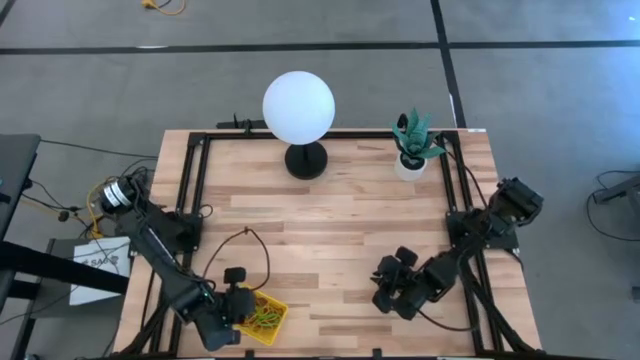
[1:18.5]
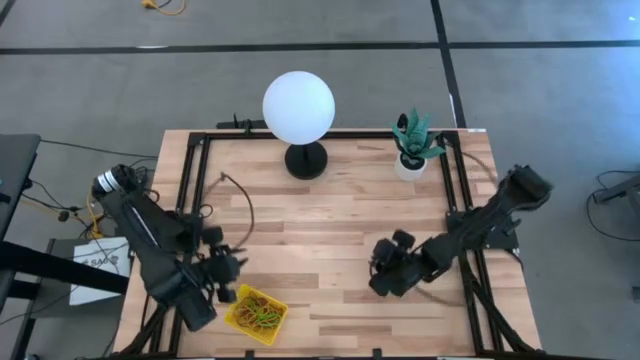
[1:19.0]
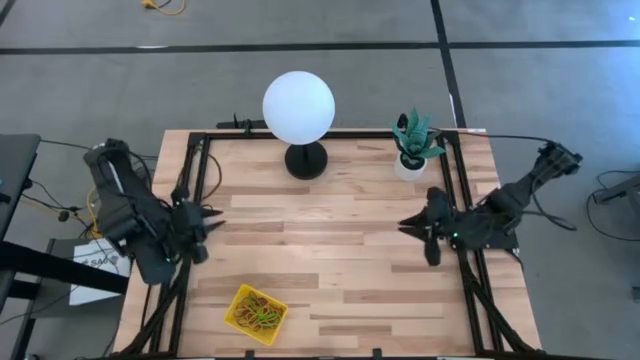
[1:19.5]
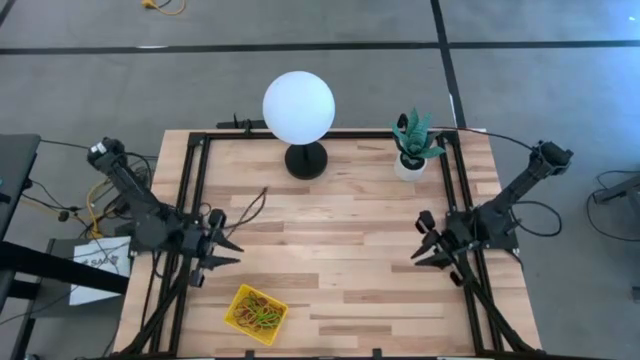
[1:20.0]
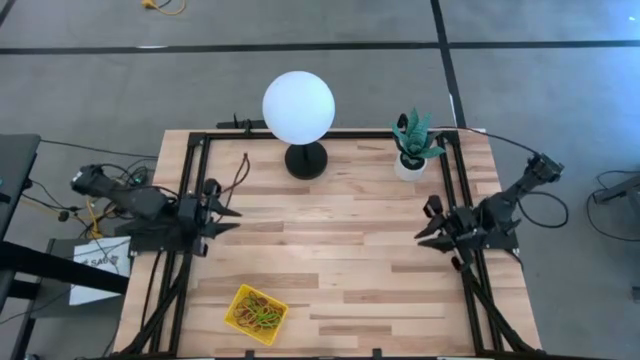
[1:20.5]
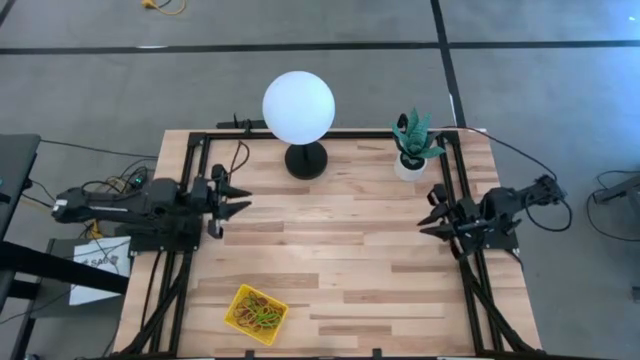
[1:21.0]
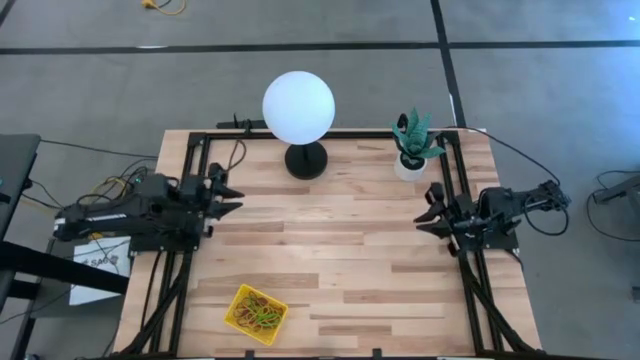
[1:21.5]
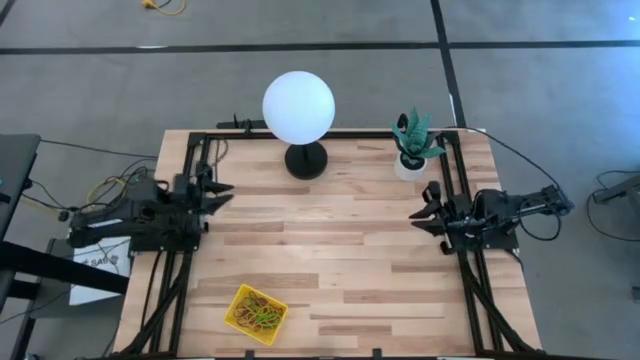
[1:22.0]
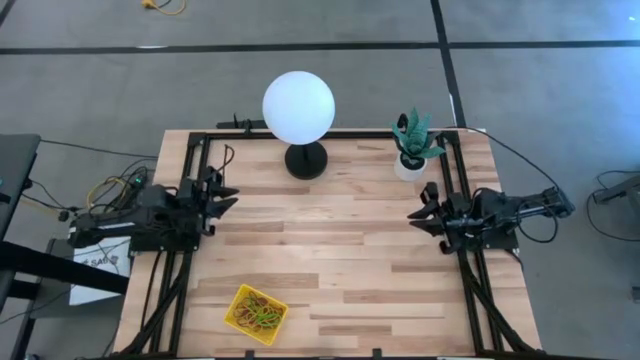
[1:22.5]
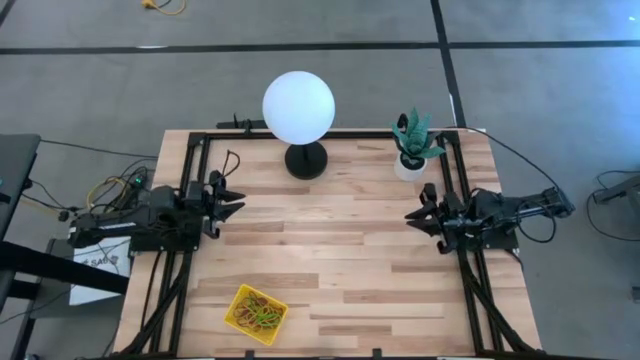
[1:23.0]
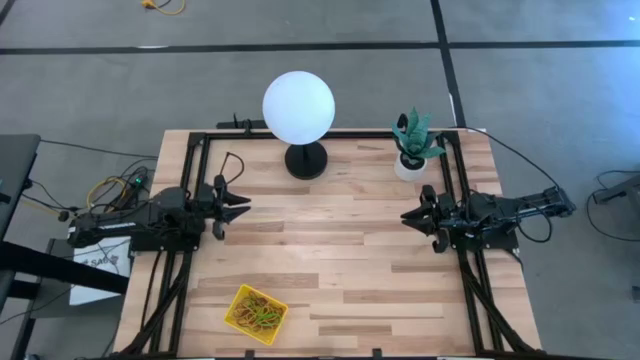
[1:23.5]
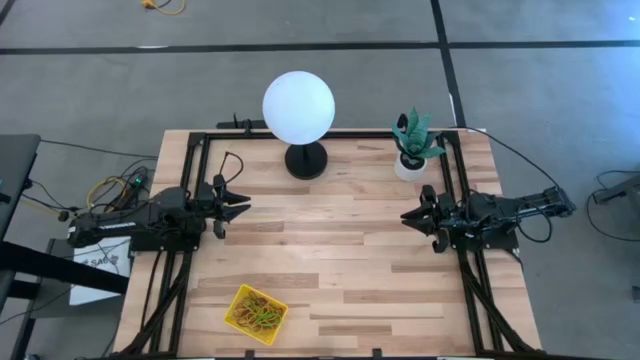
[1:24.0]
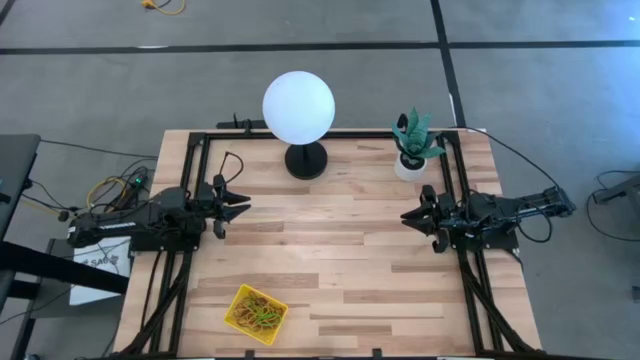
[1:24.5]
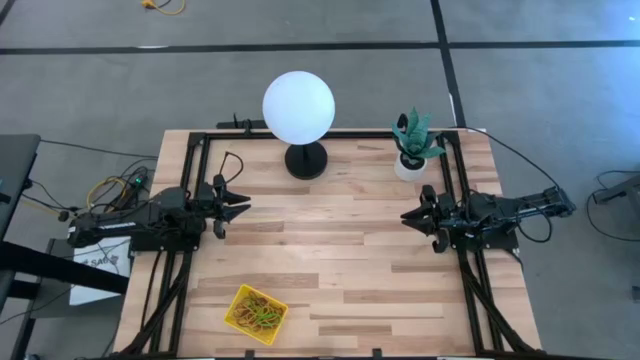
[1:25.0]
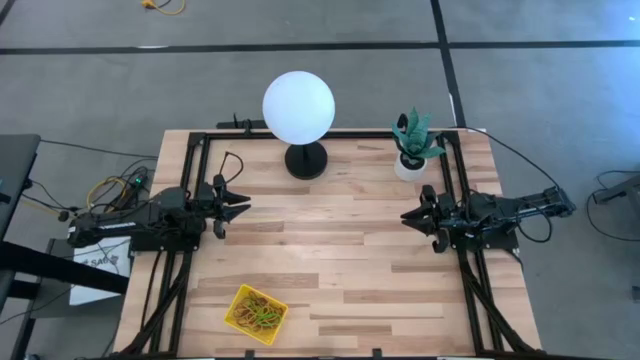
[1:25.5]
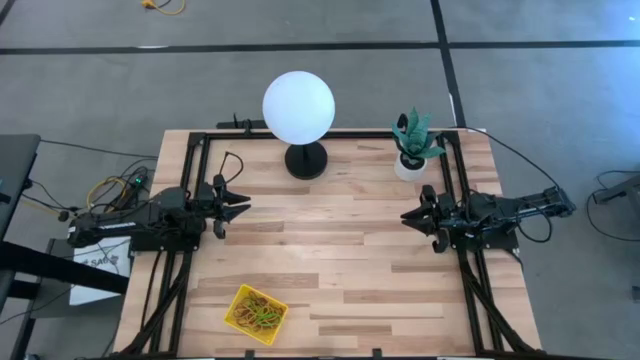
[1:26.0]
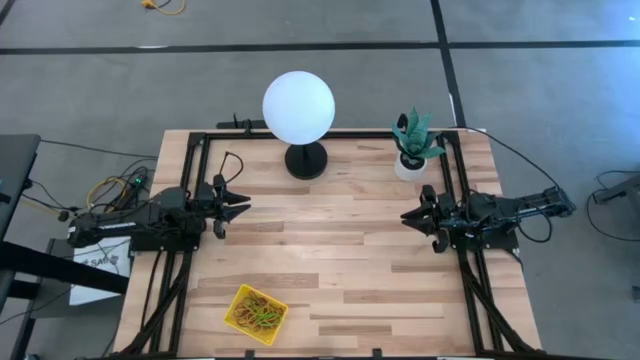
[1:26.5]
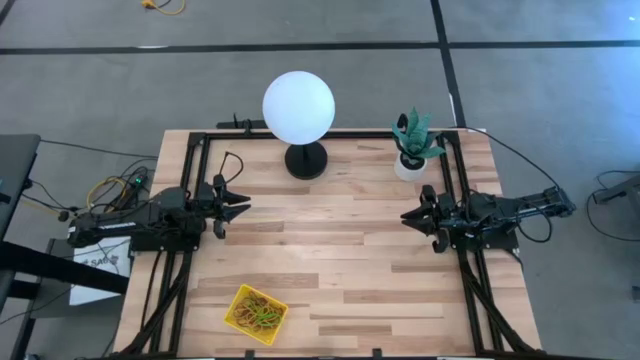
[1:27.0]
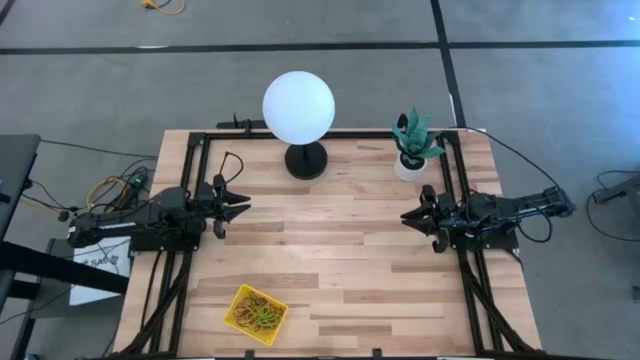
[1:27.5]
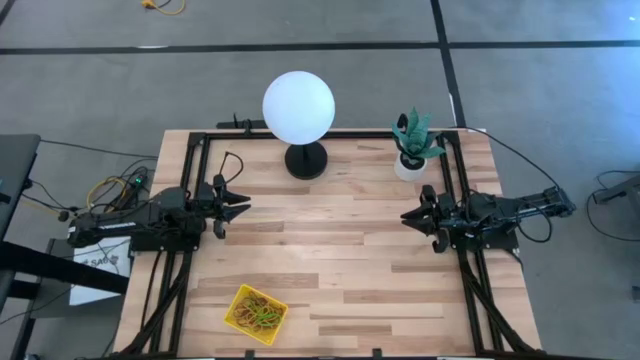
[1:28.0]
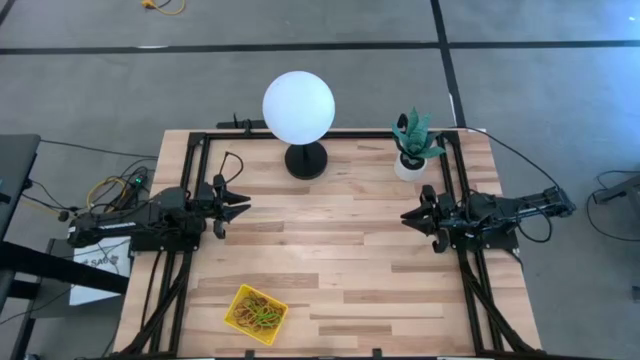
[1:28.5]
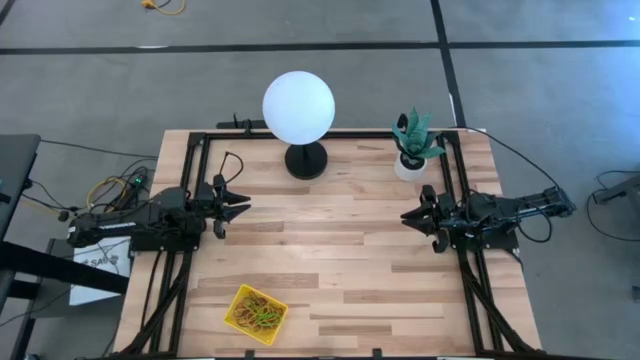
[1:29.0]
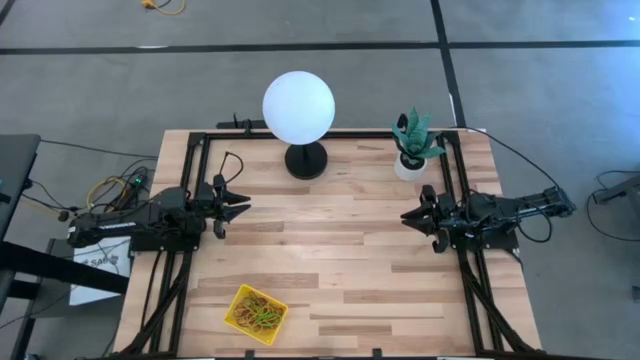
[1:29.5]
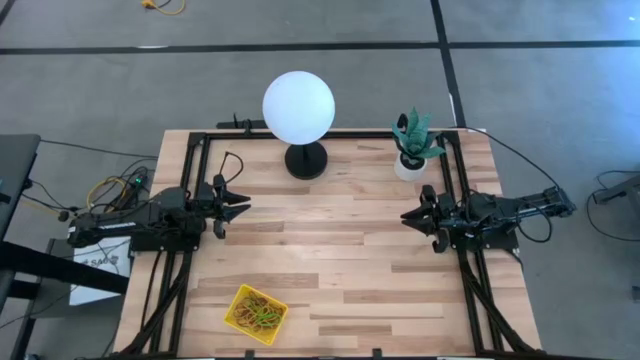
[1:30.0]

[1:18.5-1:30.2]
Task: Pick and place items into bin
Return to Home Position

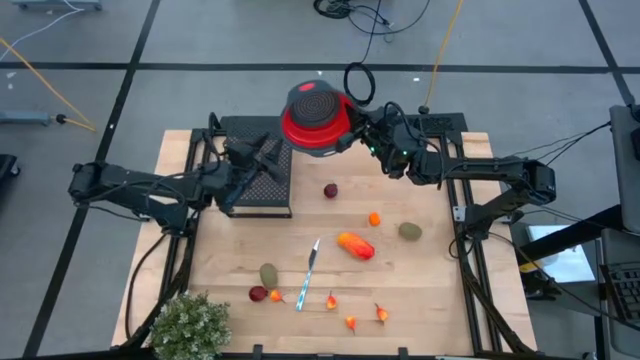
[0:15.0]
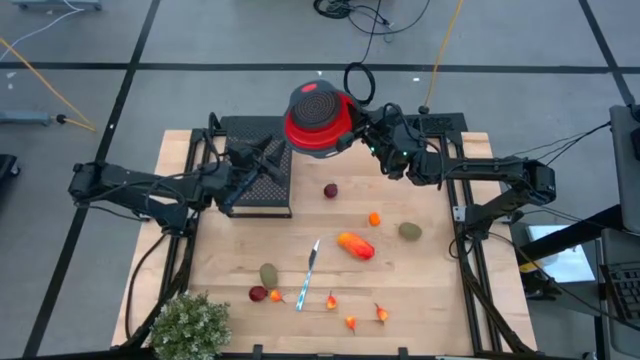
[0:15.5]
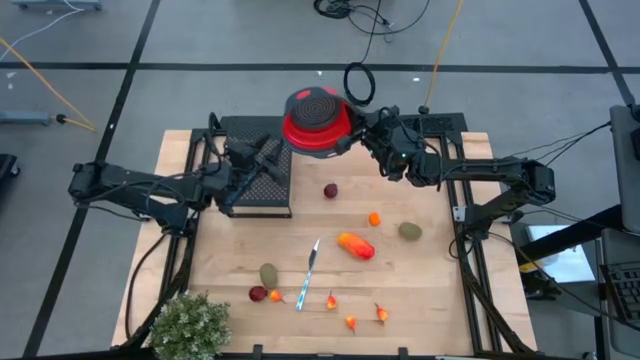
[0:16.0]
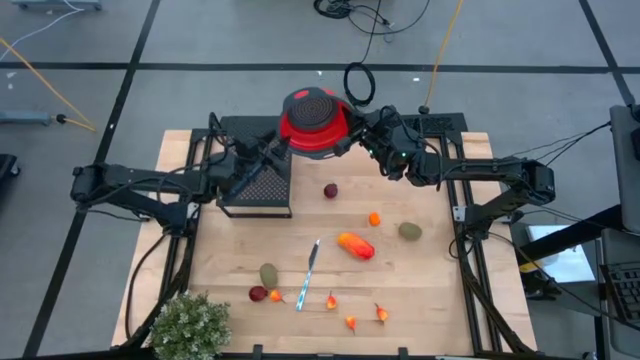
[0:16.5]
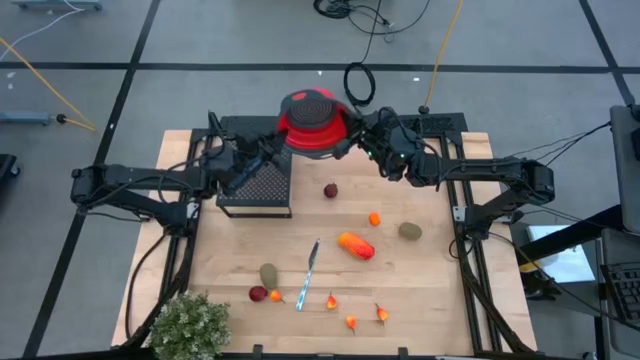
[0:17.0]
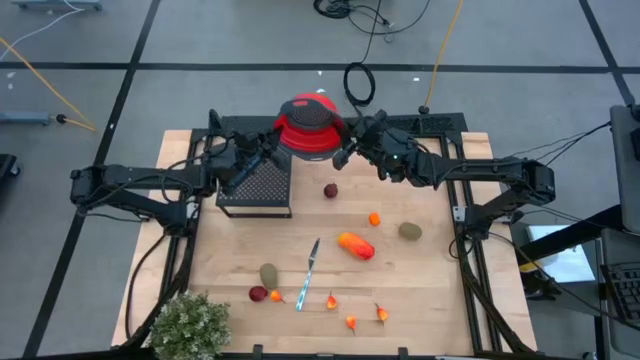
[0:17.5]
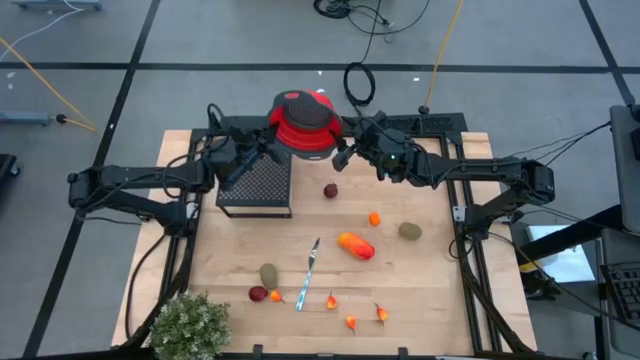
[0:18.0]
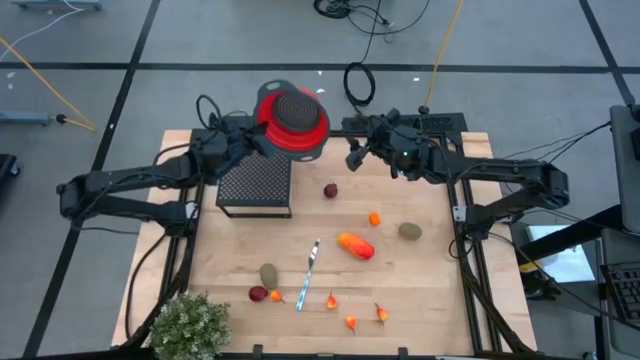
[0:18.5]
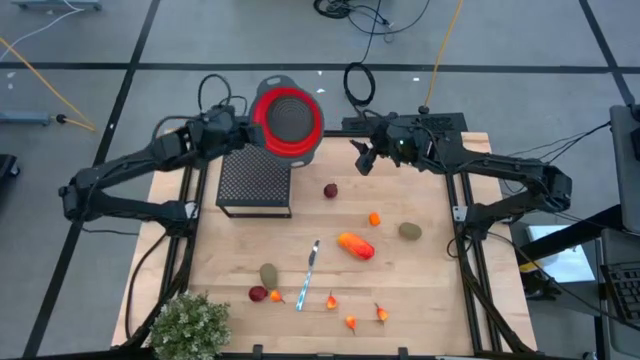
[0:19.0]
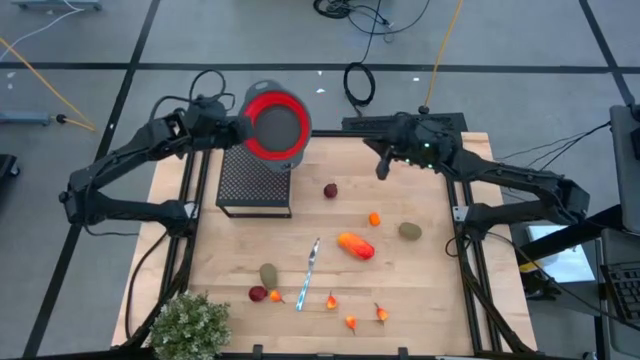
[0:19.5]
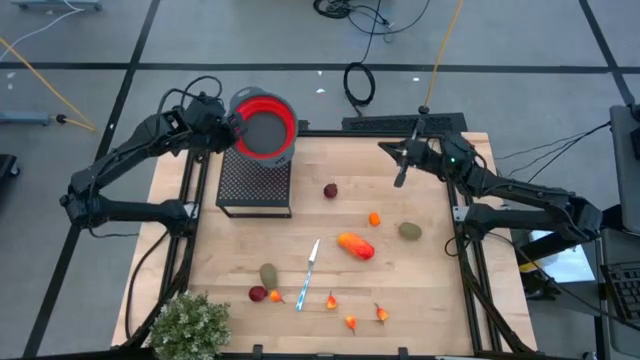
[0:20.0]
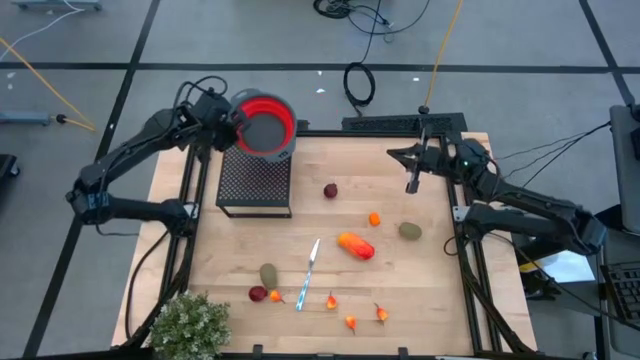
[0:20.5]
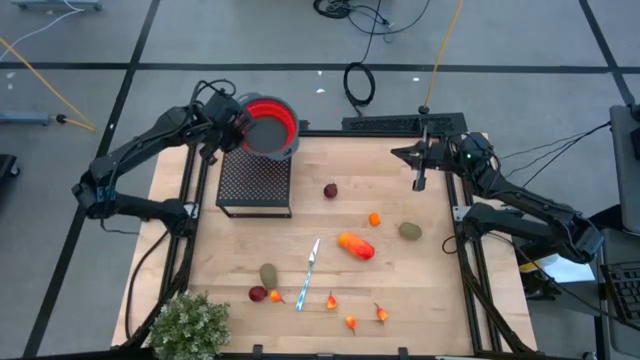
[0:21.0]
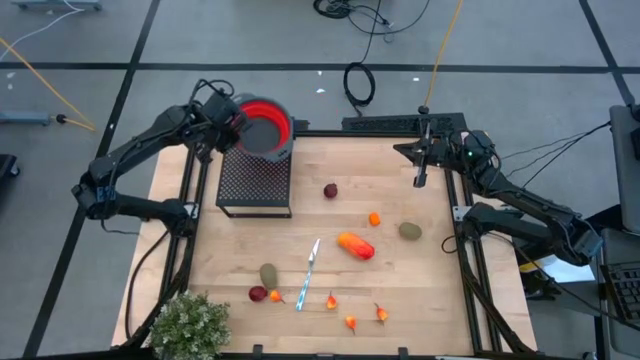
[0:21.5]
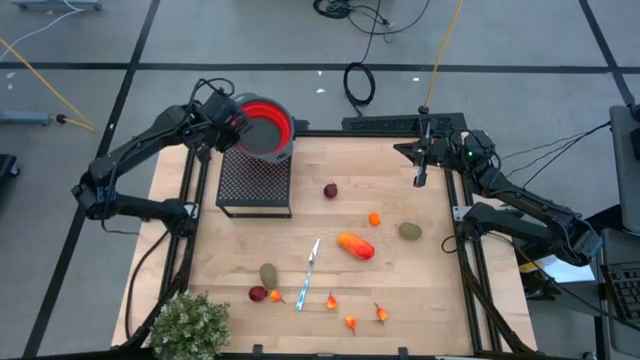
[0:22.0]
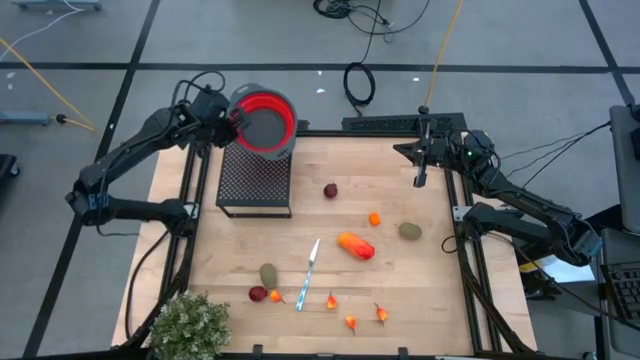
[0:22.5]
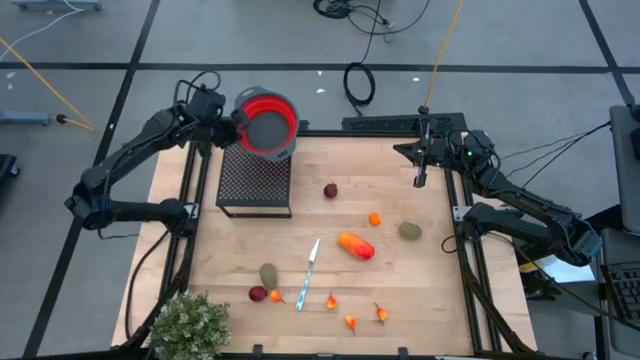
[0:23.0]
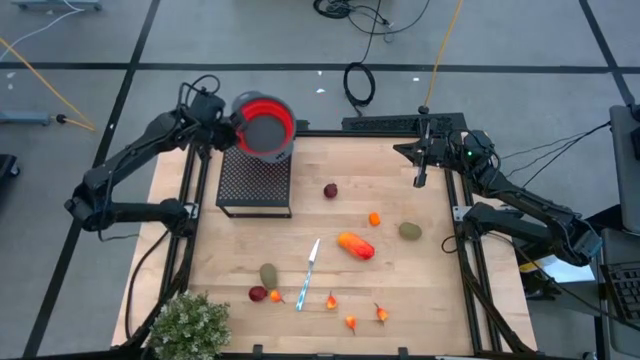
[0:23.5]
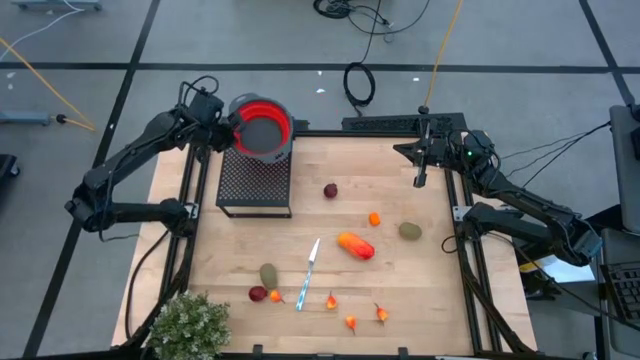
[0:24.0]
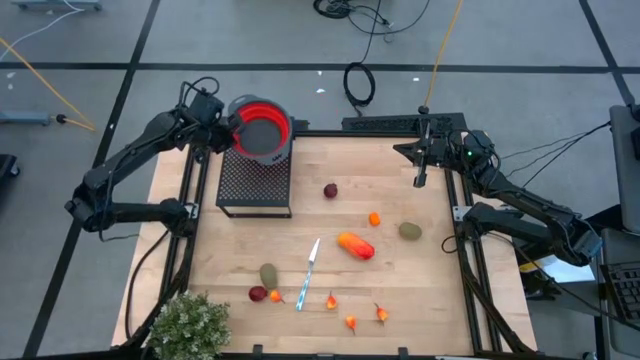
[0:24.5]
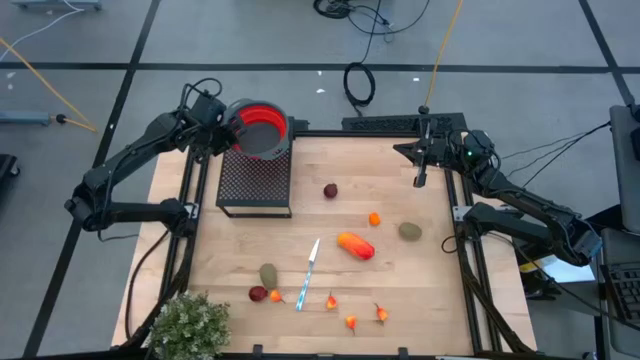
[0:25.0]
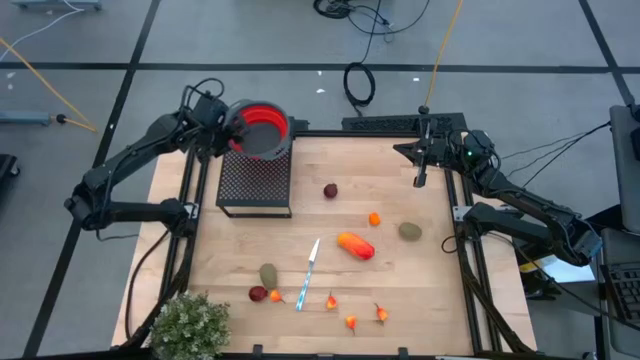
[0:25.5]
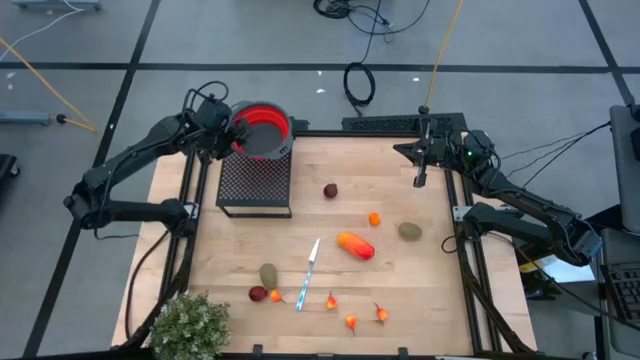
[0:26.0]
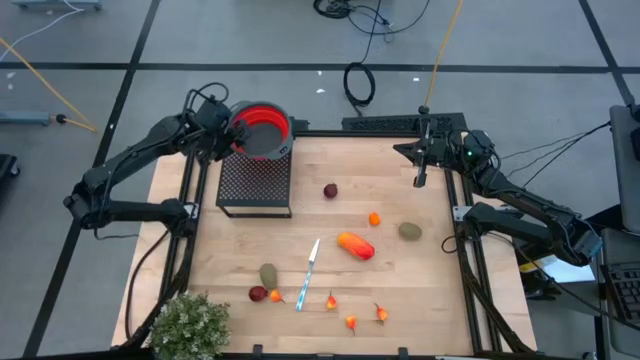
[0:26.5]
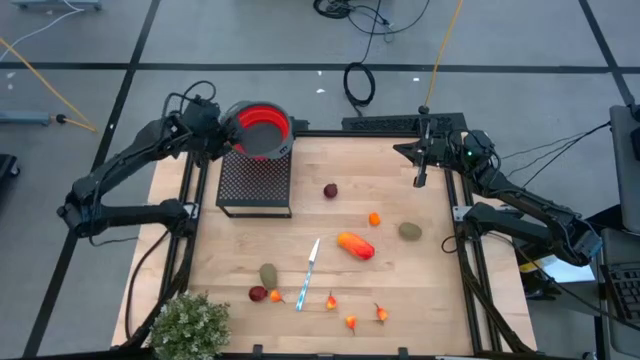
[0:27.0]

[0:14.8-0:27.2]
Task: Pick & Place Fruit
Put the red strainer bowl on the shelf
